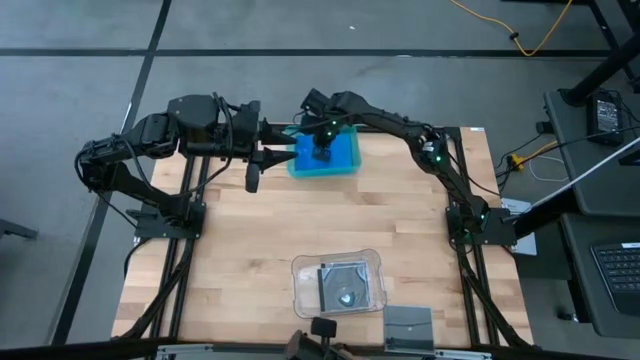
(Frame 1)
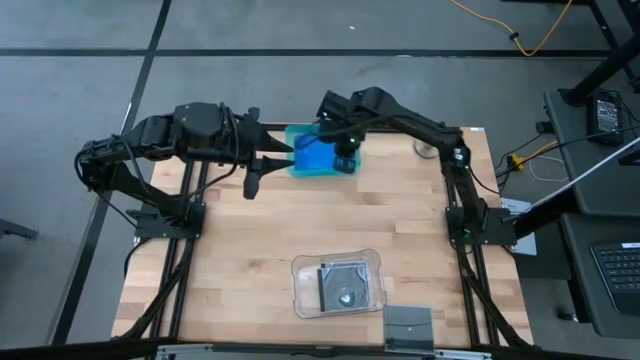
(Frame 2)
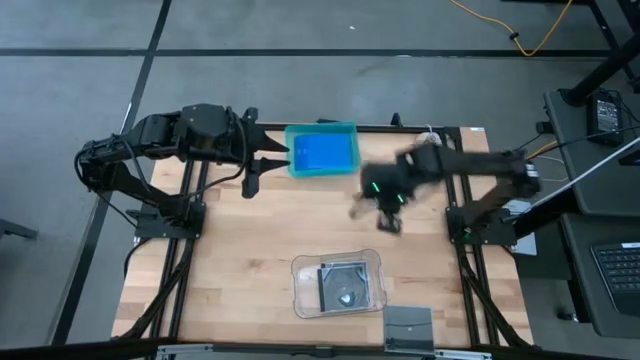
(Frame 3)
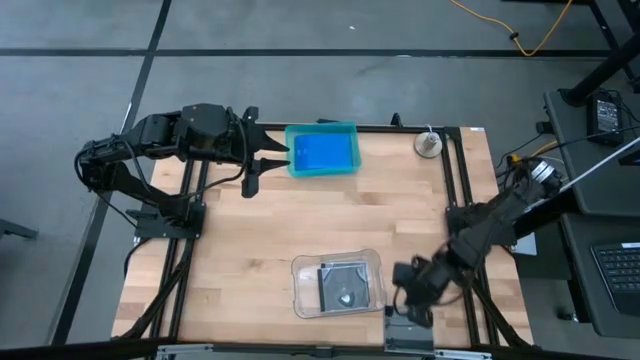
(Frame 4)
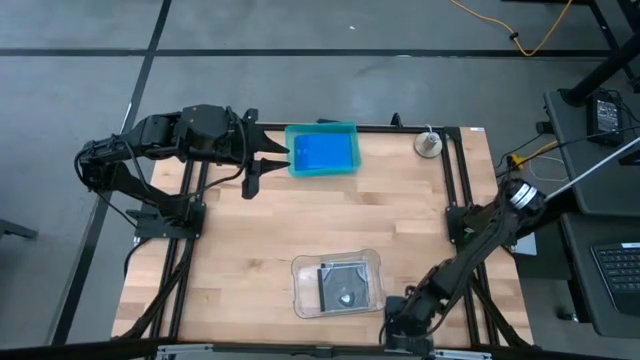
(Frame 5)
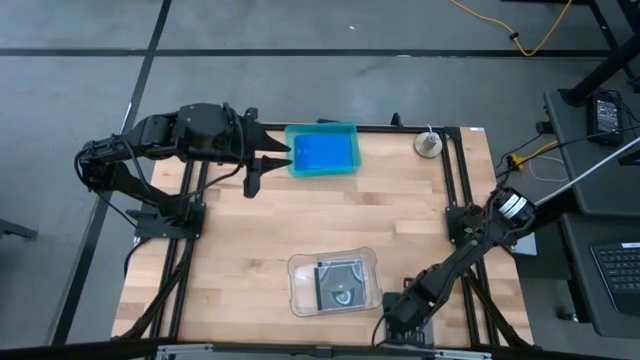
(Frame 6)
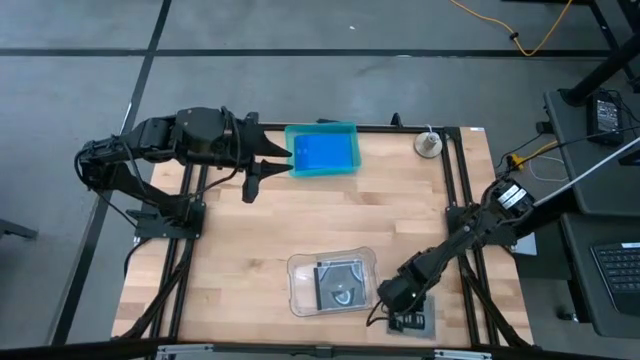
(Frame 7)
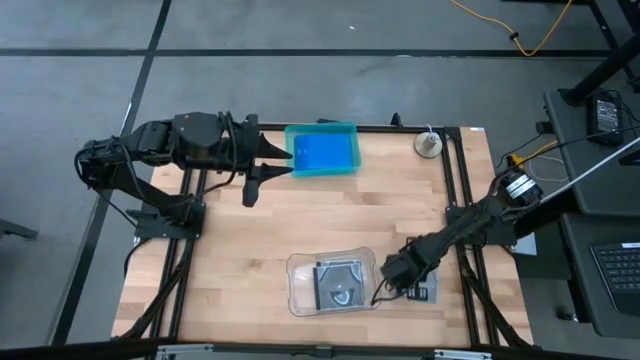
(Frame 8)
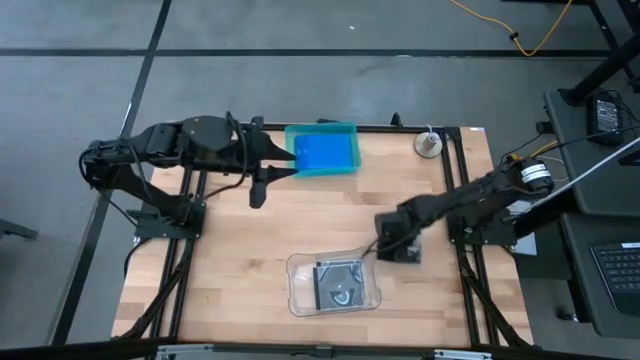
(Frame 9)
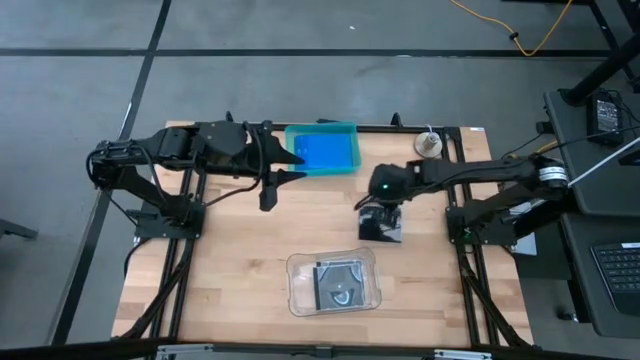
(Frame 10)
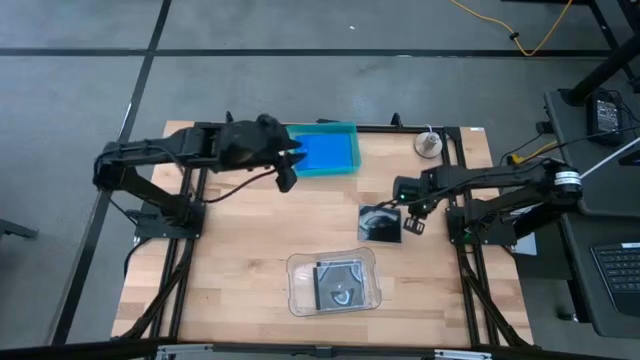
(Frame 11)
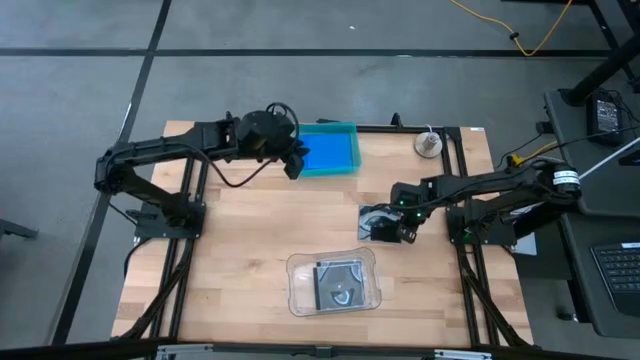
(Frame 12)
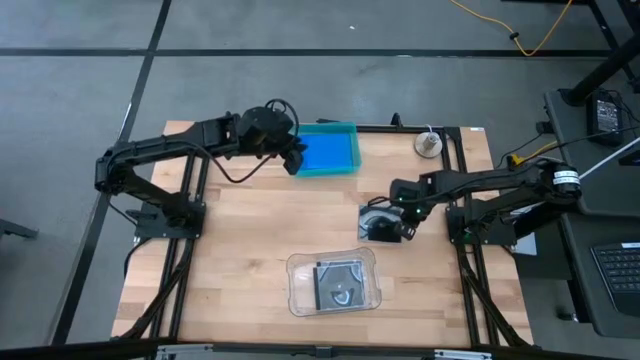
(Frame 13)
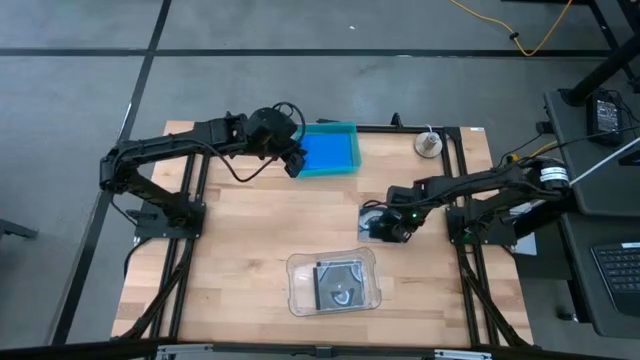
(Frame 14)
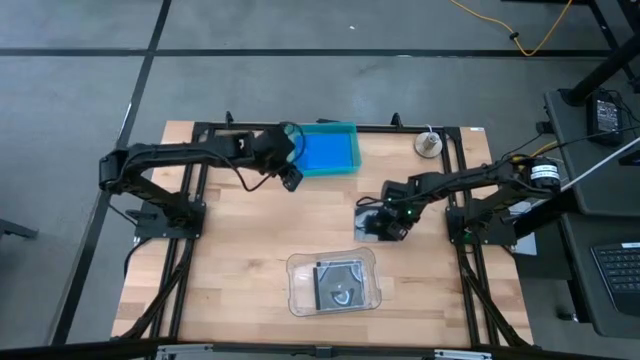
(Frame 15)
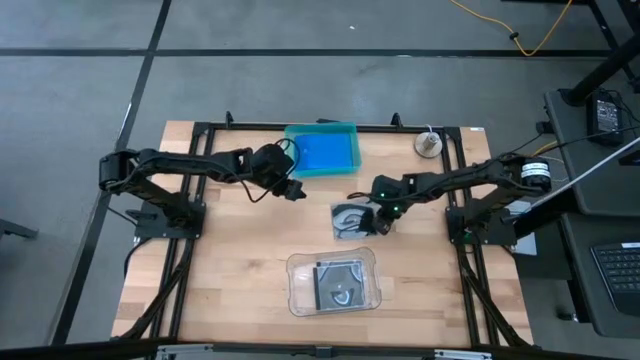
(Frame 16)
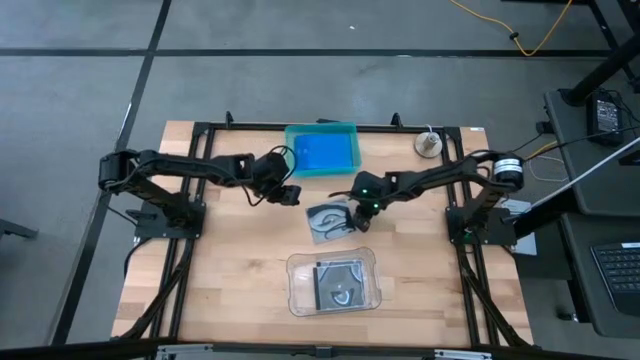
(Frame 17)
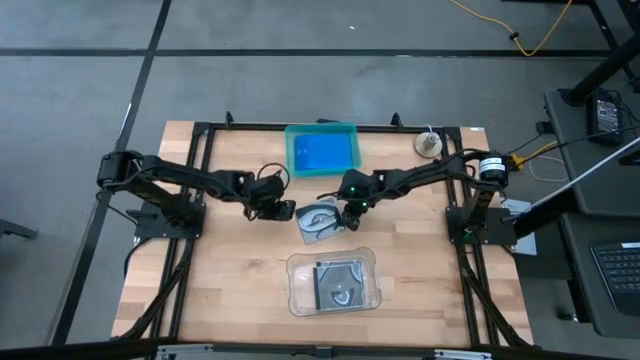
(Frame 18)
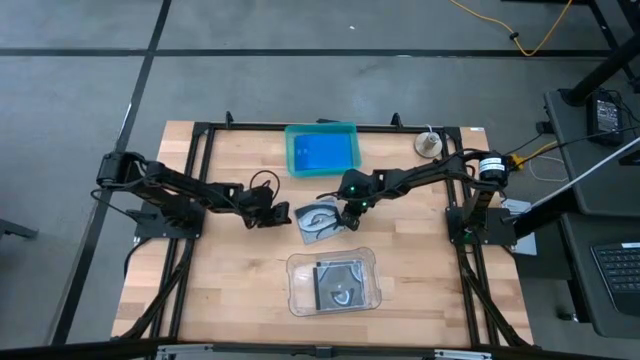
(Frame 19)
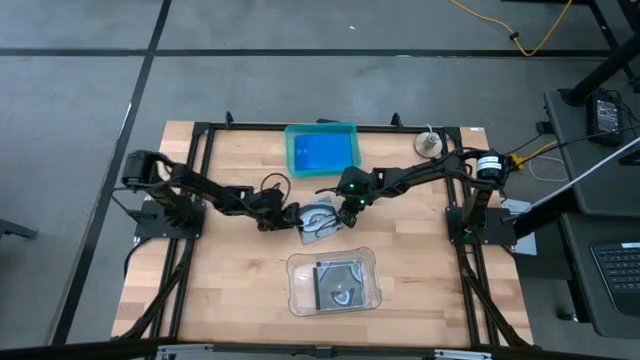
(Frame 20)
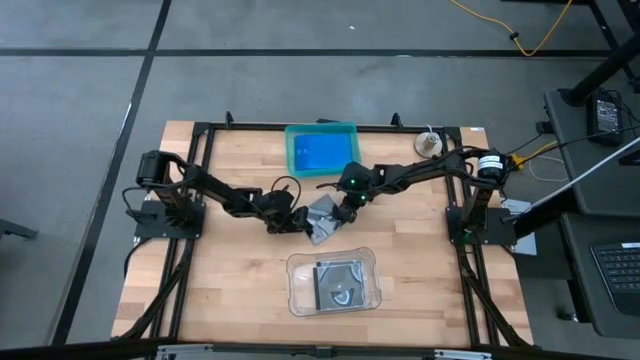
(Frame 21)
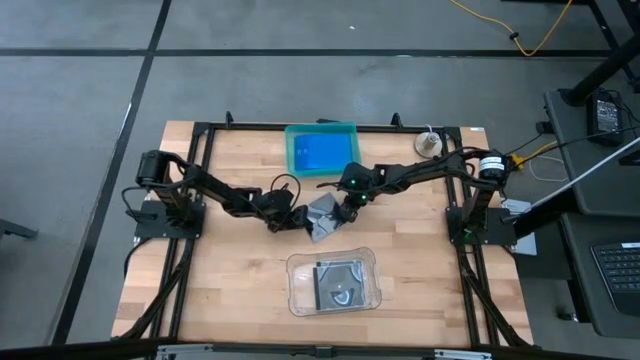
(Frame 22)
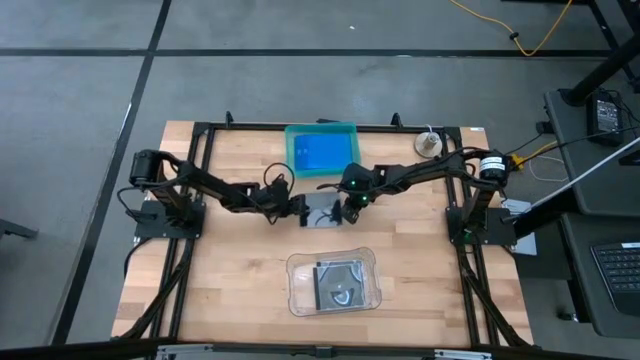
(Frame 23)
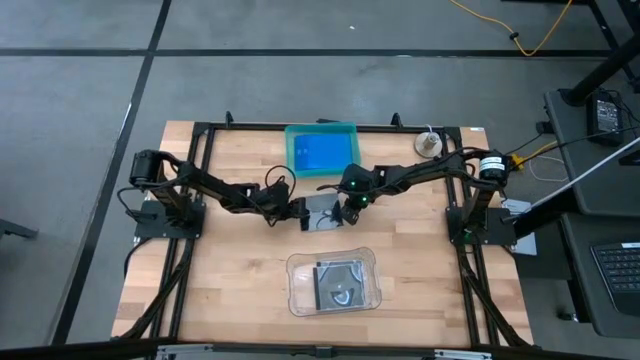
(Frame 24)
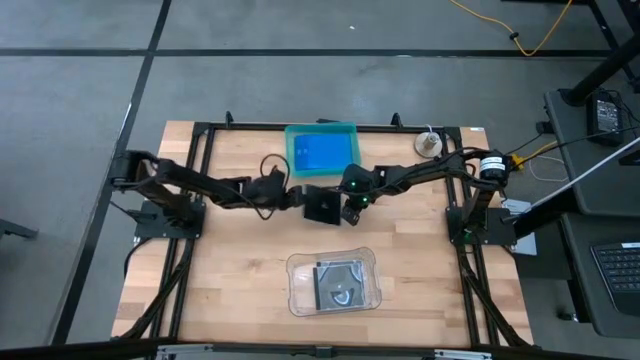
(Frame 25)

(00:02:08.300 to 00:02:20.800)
Task: Pick & place jewel cases by type
Put the black CD case into the transparent bin

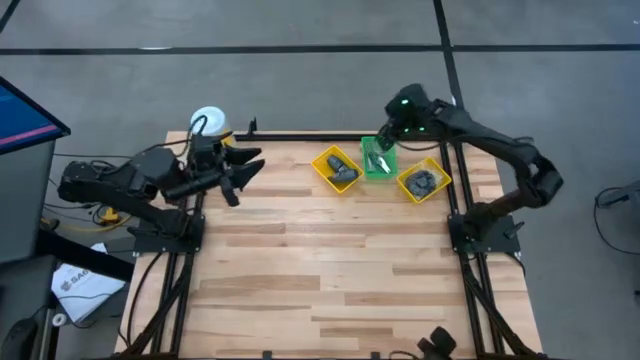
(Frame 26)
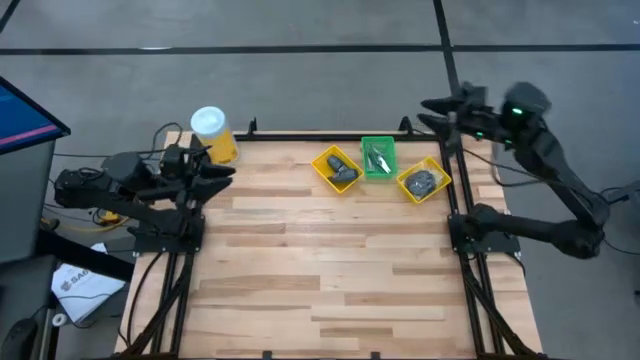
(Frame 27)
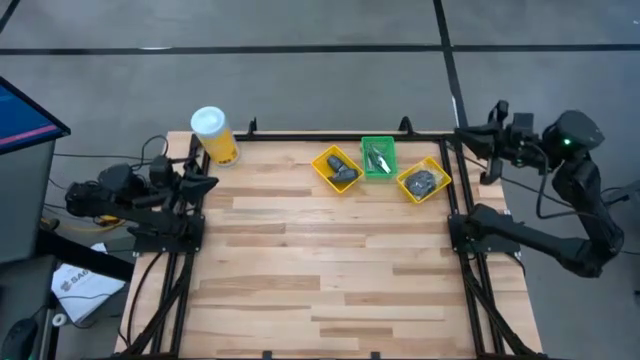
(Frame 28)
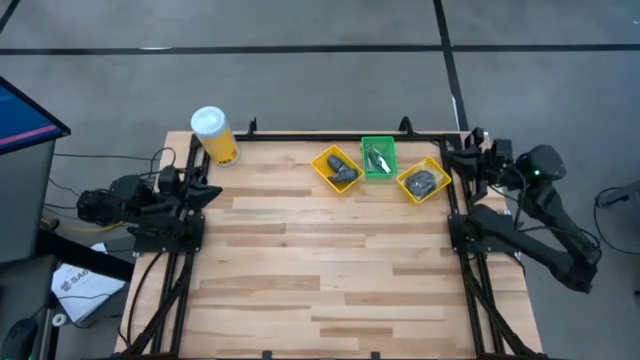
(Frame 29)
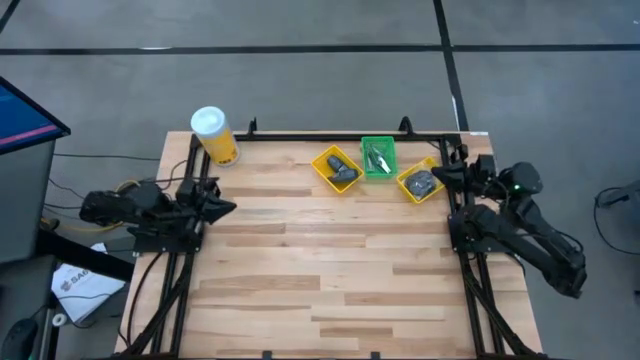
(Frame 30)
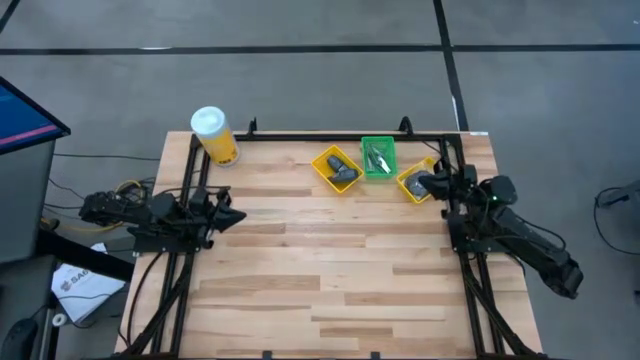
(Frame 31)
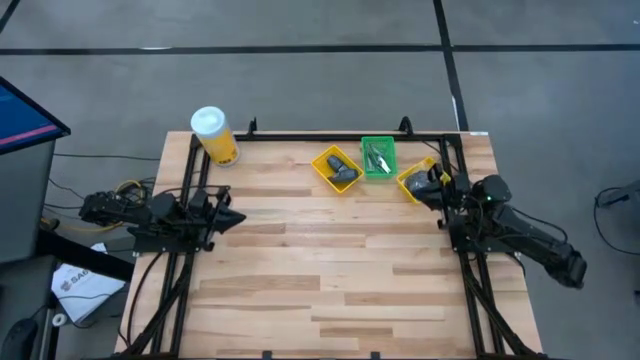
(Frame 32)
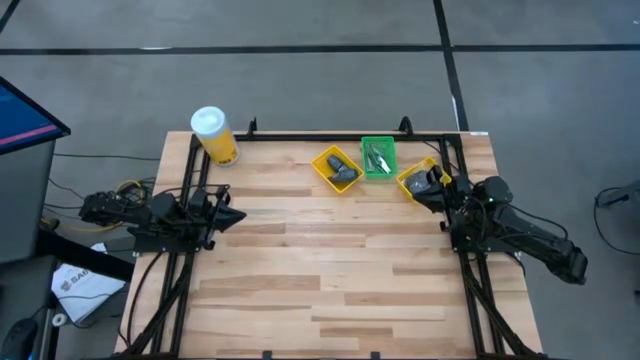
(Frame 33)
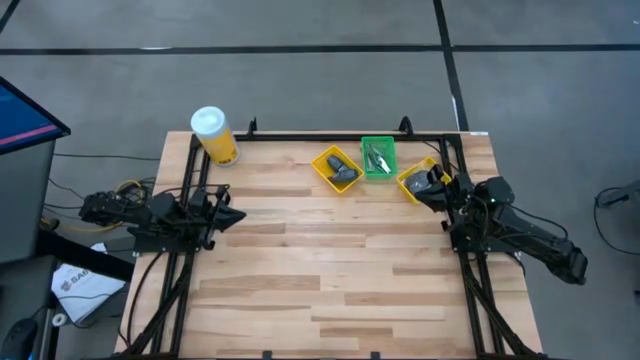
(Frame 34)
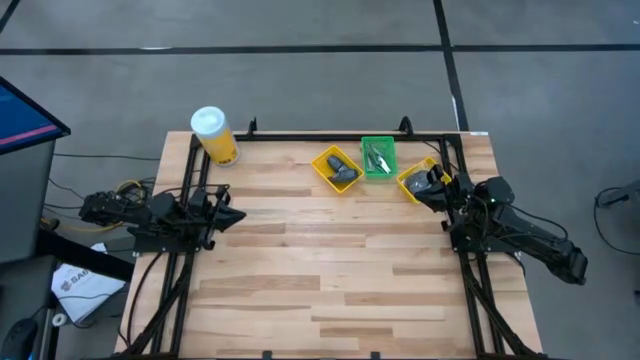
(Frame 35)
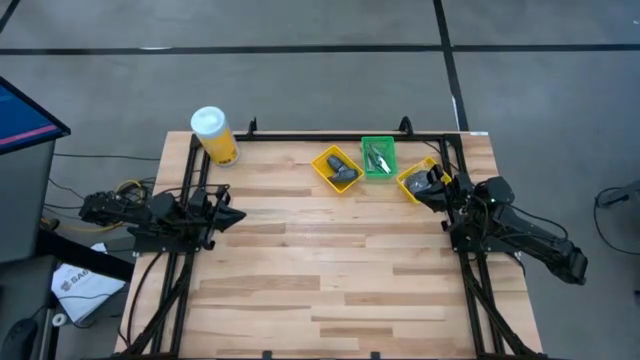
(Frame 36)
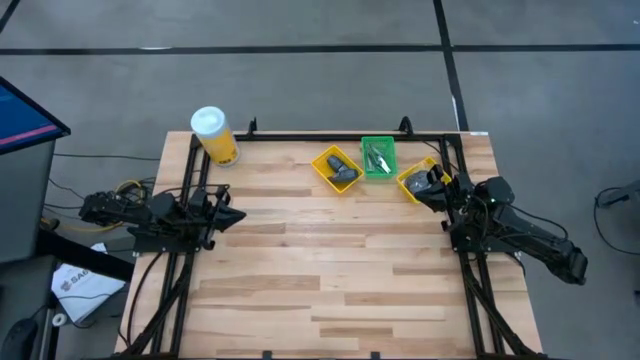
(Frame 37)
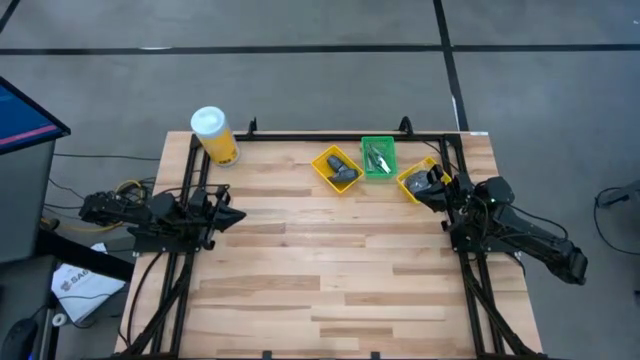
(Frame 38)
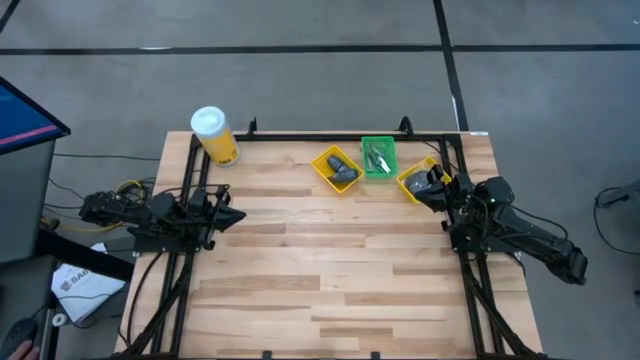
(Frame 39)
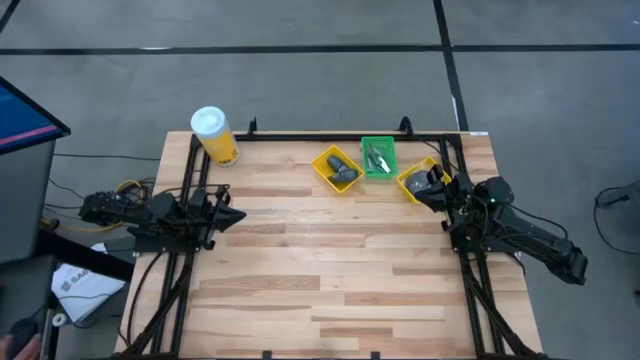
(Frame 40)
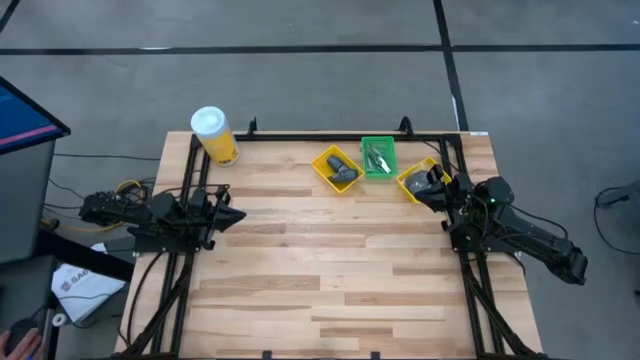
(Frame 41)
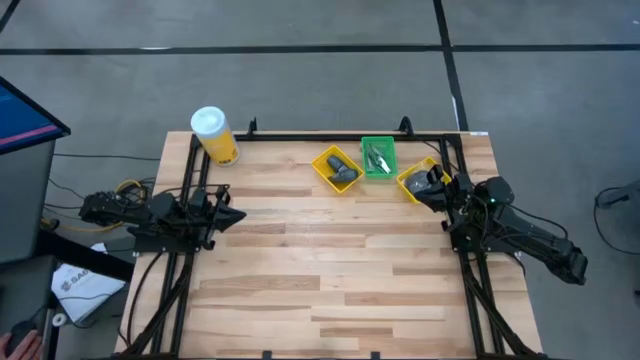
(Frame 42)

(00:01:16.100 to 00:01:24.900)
Task: Pick & Place Travel size toiletries
Return to Home Position

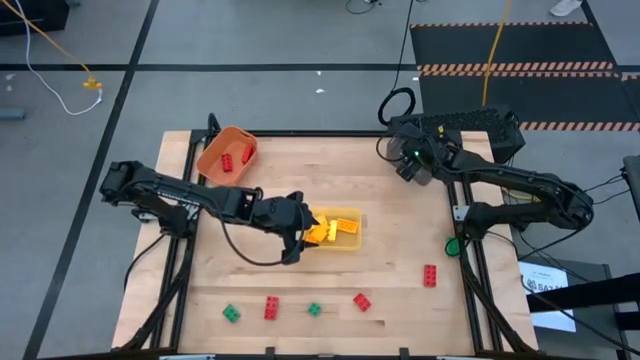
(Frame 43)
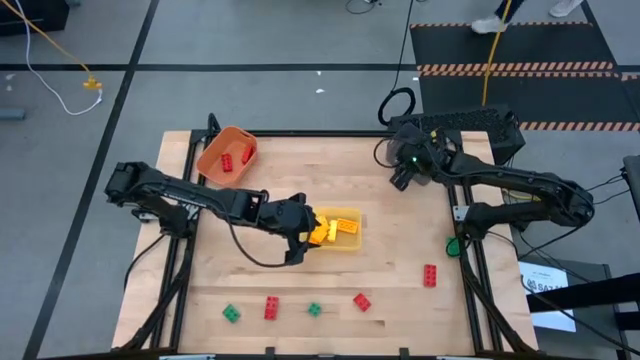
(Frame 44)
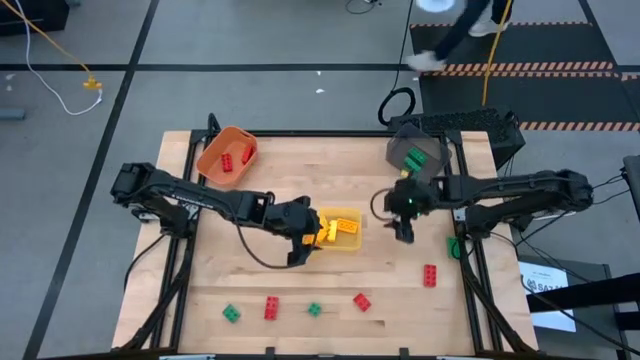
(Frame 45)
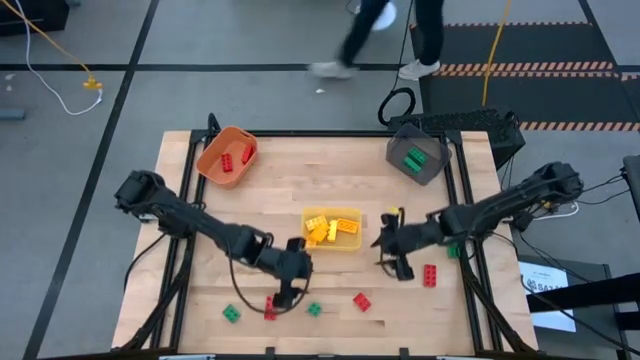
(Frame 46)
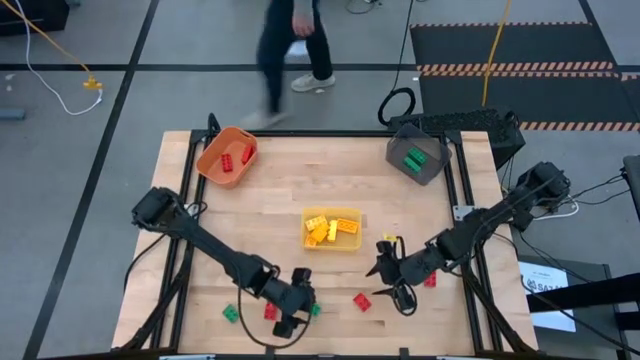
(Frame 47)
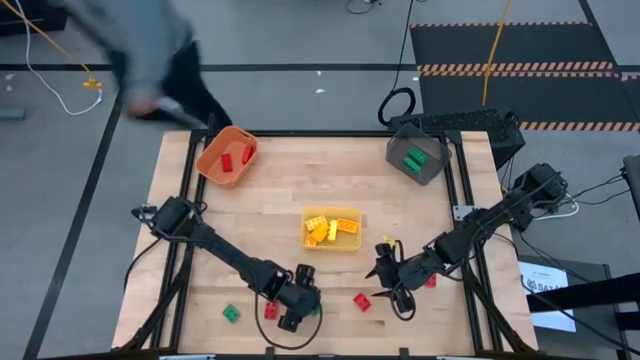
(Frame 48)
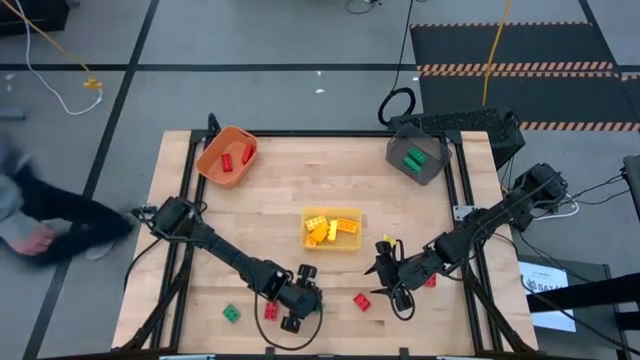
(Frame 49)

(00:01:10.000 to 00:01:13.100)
Task: Sort & place blocks by color
Put the center green 4-stud game piece into the black bin
